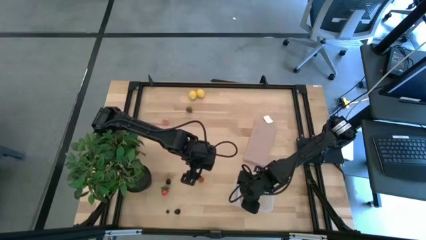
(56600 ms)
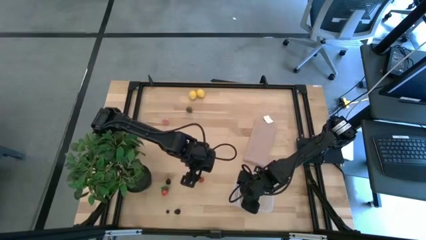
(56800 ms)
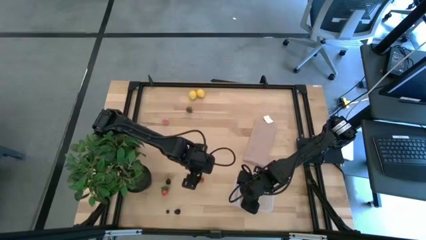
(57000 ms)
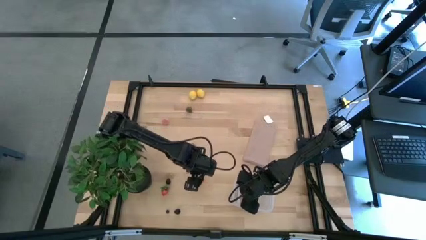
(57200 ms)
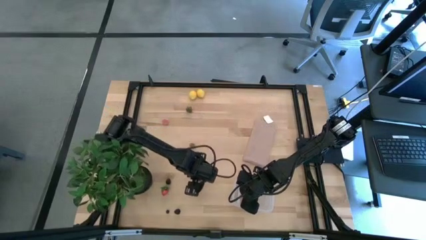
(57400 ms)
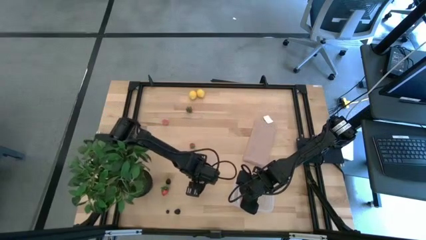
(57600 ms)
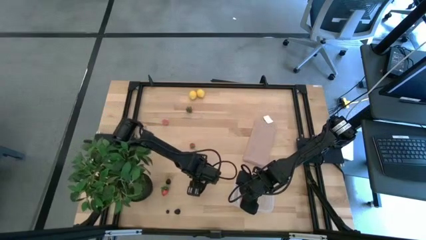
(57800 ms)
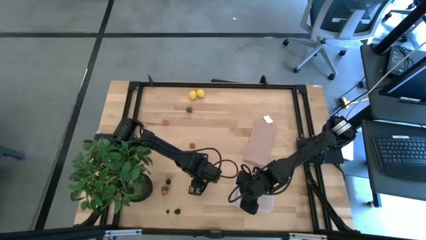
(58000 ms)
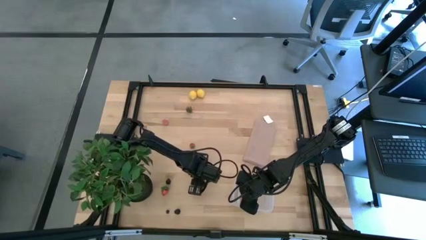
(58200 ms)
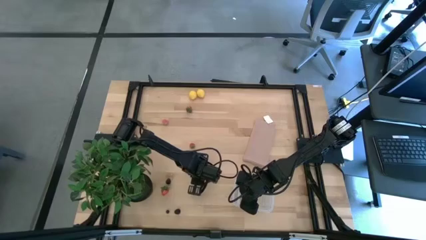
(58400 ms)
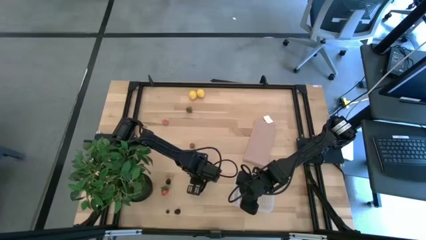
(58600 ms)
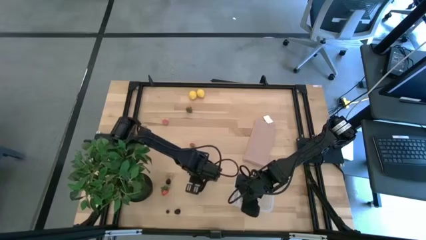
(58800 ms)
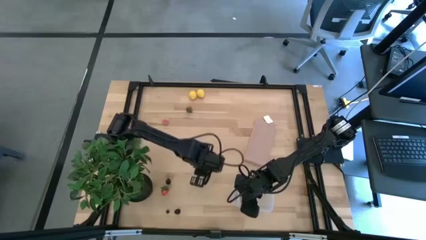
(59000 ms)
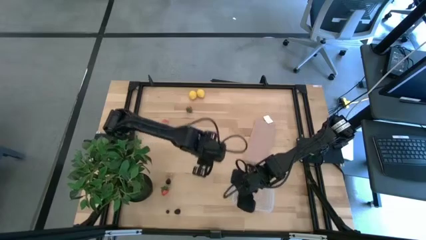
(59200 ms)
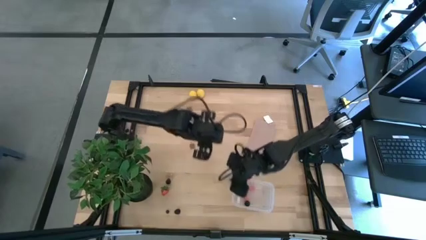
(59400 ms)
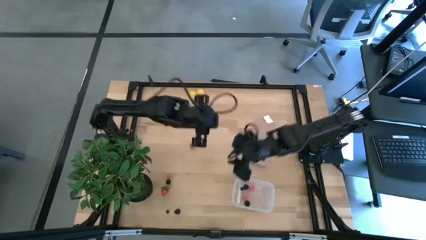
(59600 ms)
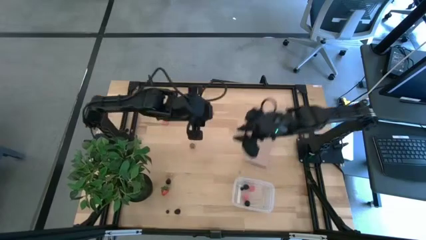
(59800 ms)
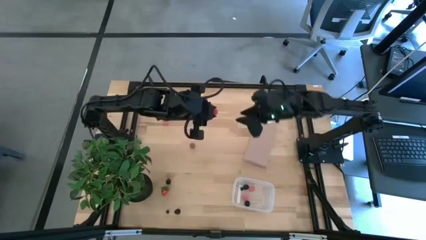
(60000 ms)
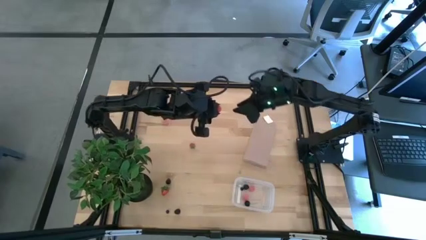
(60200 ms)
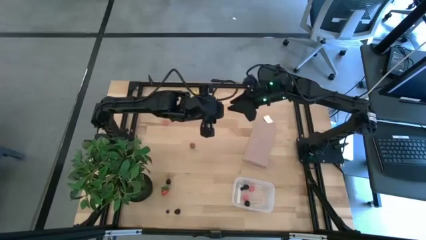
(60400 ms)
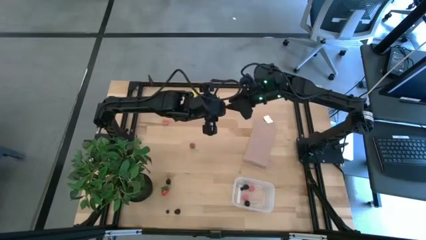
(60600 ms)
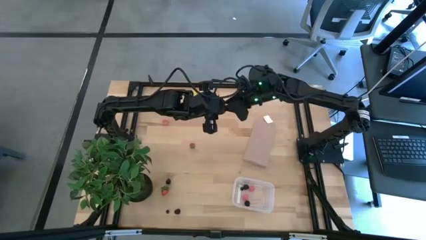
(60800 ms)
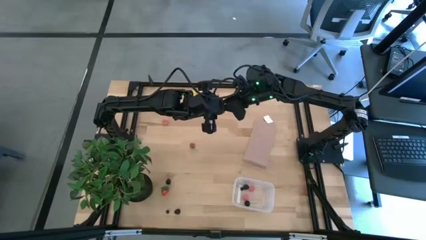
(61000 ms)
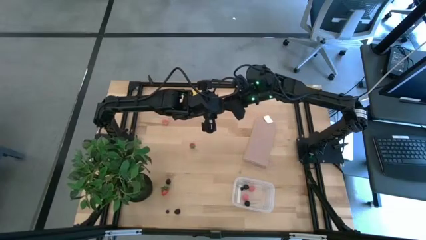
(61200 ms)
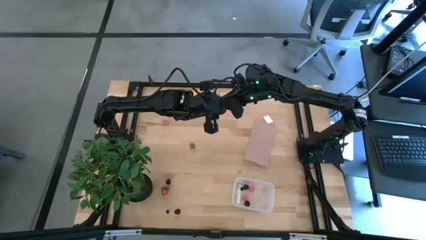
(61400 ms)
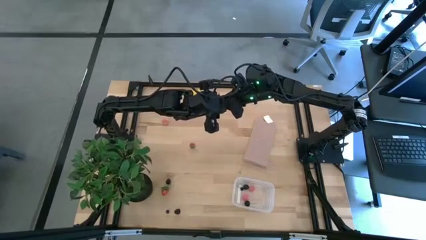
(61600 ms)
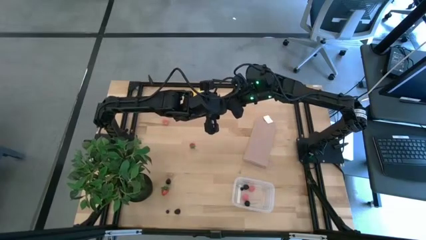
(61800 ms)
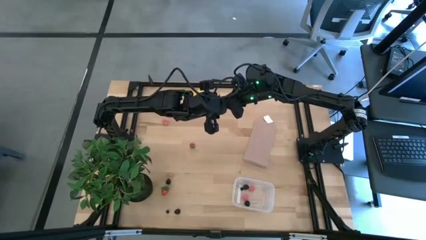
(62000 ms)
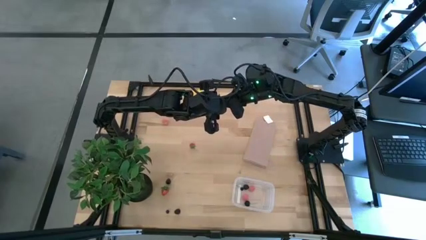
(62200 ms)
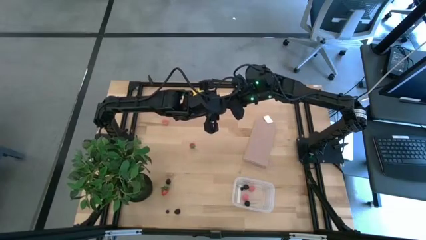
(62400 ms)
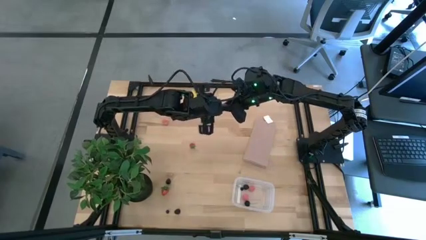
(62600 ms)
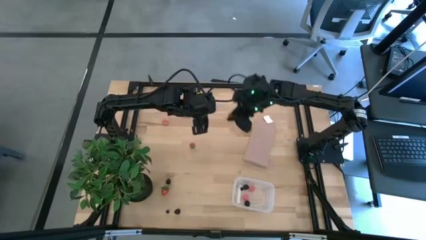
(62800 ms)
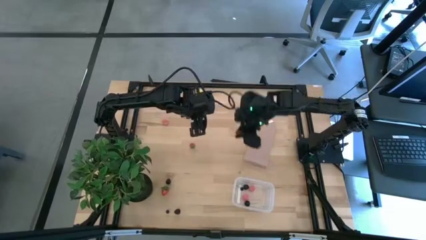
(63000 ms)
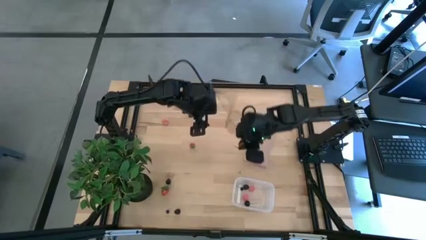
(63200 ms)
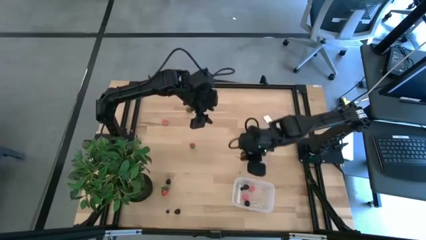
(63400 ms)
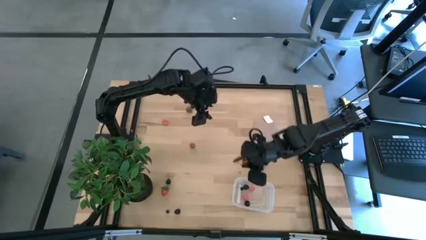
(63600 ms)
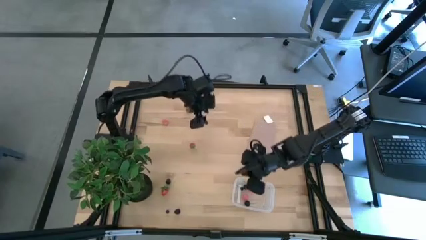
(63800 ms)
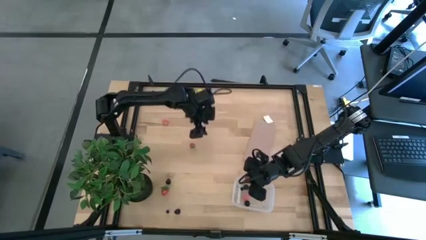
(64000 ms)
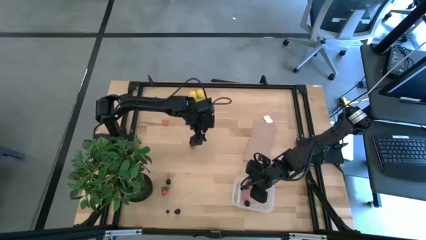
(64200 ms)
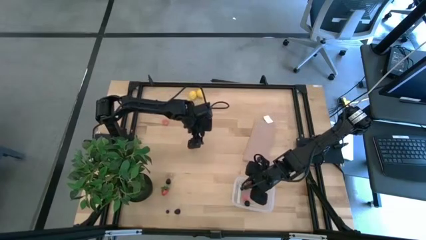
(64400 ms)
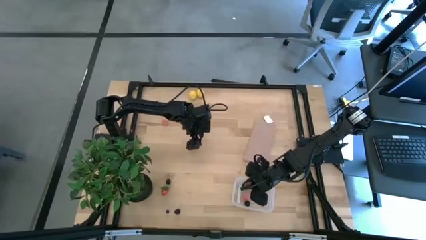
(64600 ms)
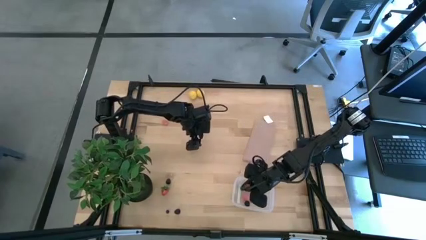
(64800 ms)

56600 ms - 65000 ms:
Task: Pick and placing Produce into tupperware
Put the strawberry into the transparent container

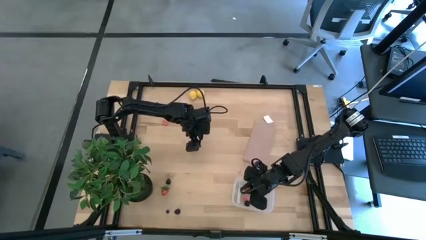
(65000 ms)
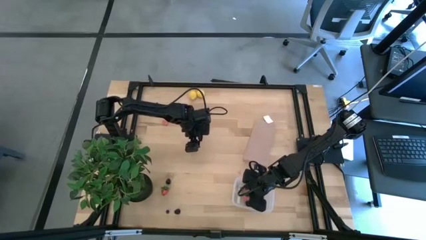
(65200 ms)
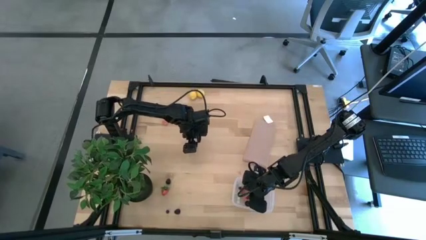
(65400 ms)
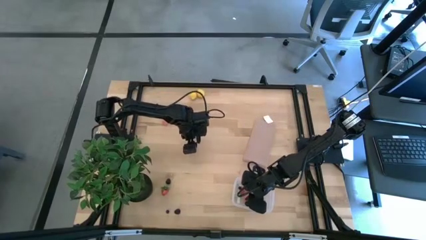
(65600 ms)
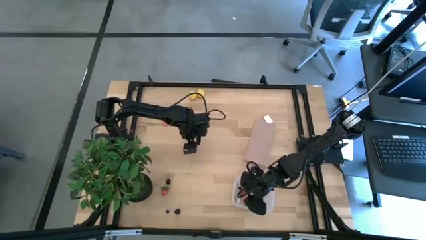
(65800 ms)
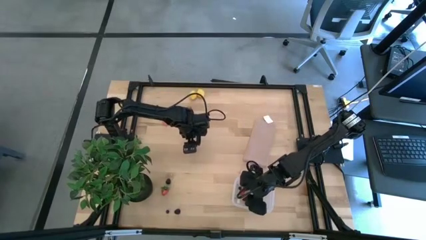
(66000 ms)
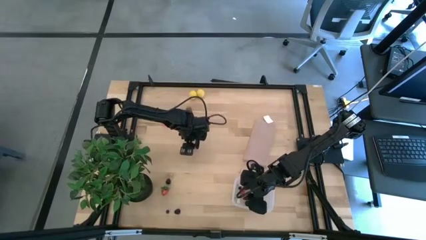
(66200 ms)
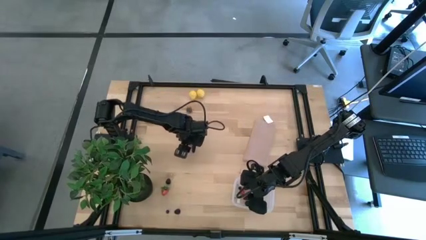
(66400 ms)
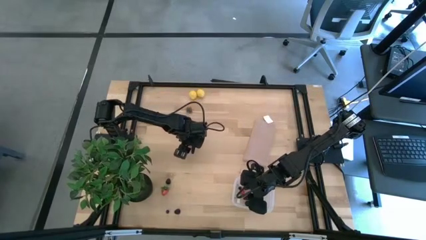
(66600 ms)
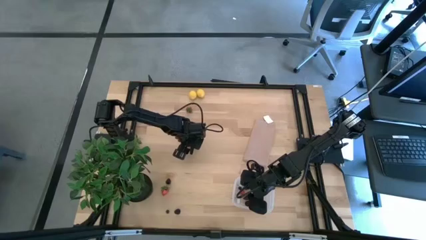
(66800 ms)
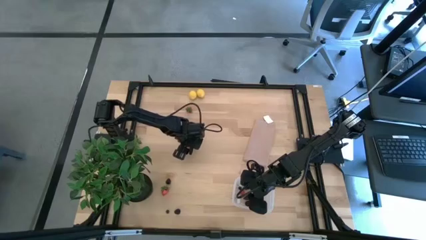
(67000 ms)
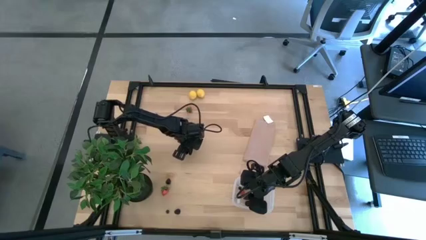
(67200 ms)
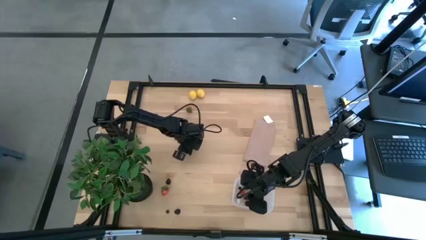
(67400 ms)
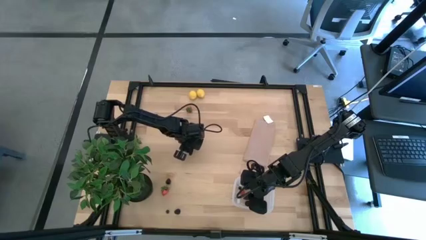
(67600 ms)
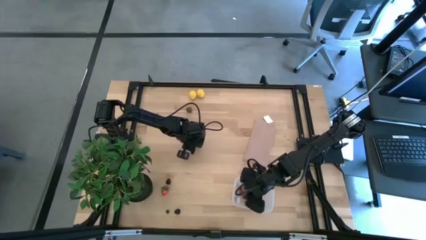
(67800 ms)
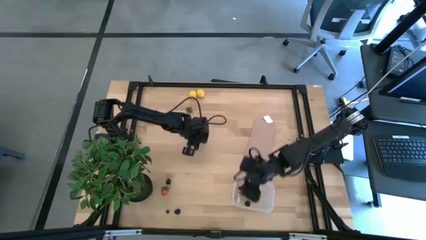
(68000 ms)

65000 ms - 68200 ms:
Put the strawberry into the transparent container

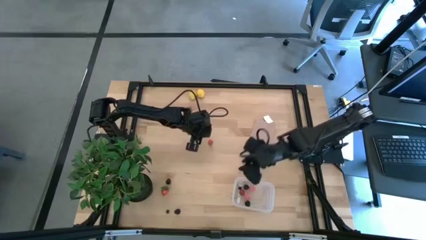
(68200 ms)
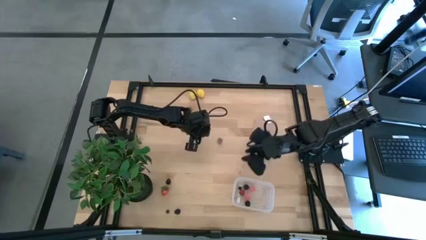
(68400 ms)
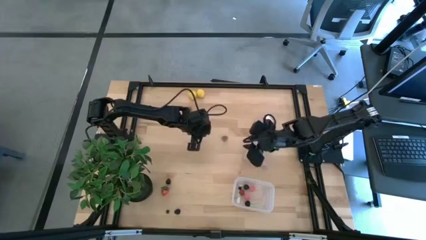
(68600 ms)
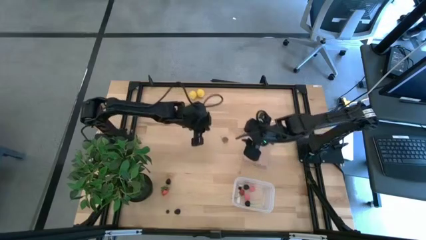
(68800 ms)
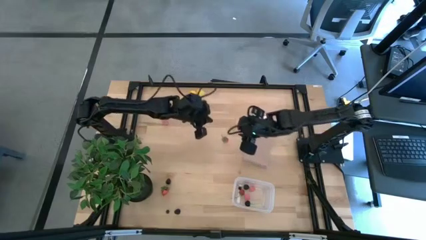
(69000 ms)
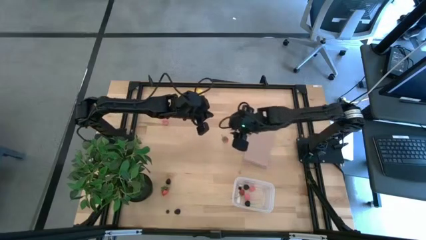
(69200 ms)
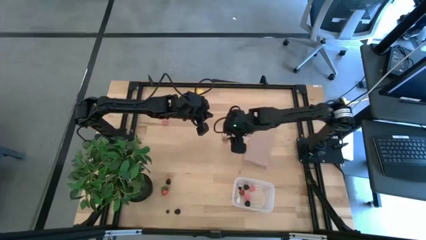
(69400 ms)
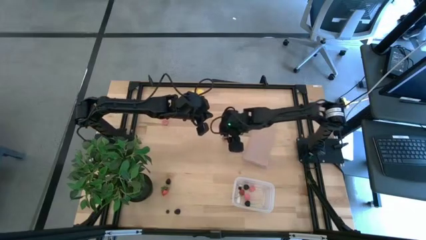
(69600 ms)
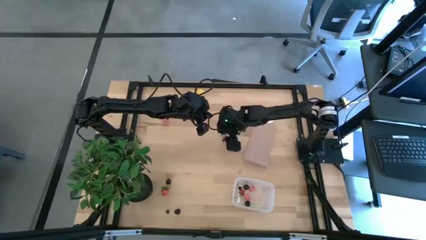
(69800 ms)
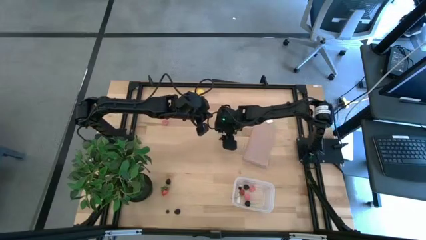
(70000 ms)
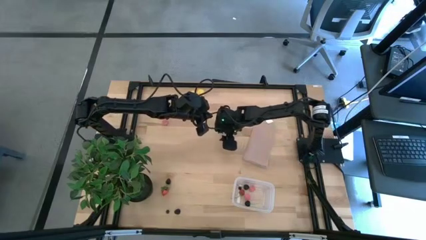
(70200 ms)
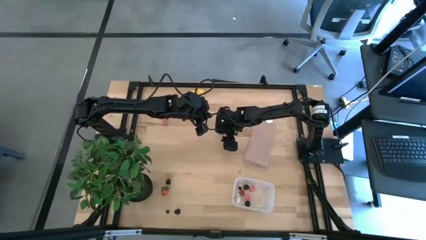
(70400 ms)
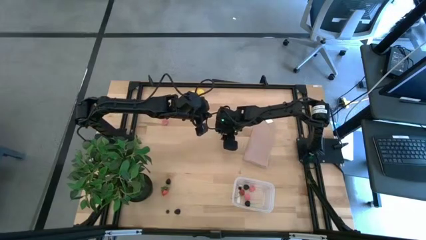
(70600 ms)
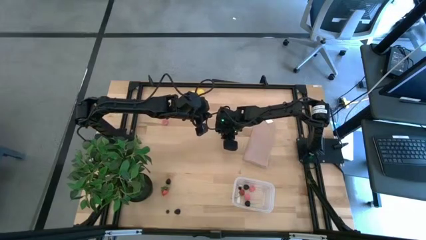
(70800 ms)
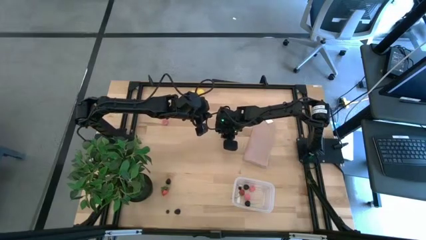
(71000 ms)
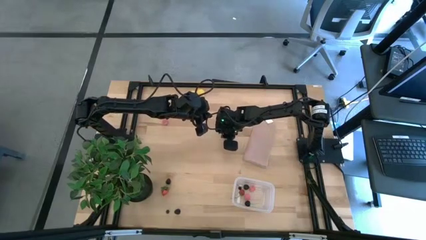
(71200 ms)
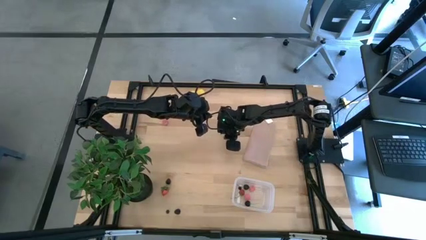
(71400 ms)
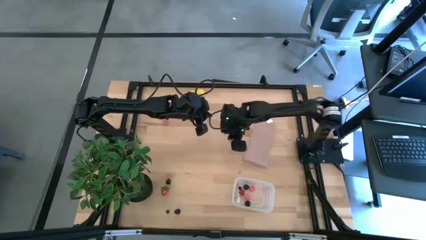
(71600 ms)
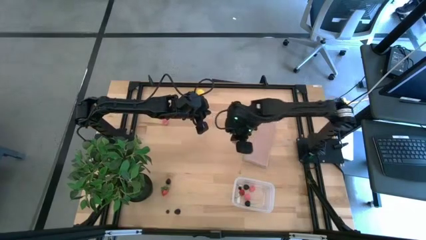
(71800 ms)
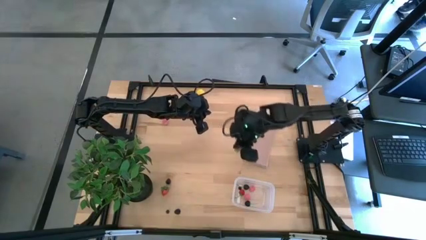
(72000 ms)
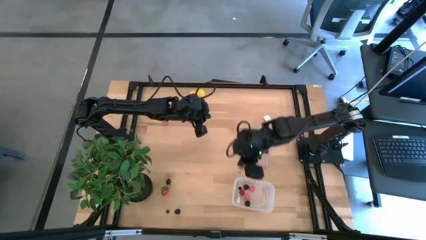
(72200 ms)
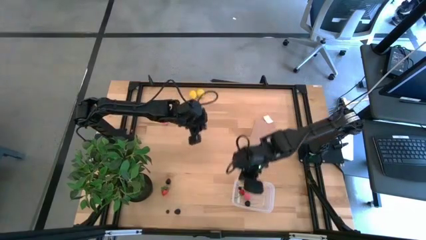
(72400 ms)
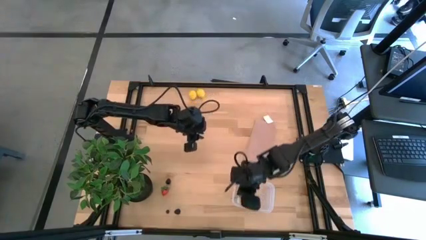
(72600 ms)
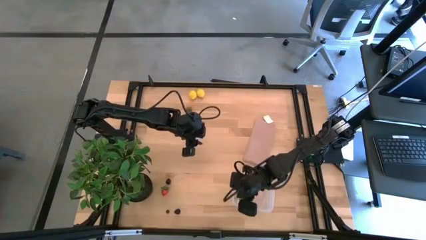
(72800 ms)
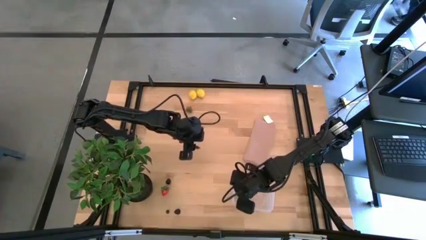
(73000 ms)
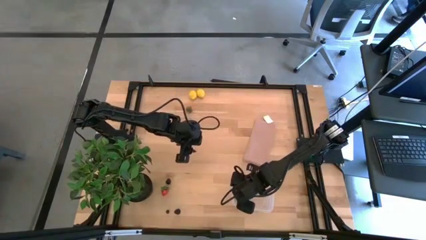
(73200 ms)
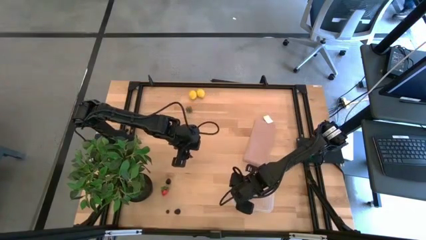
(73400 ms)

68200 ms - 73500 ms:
Put the strawberry into the transparent container
